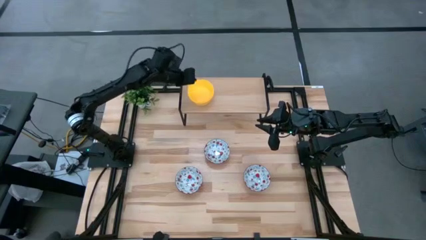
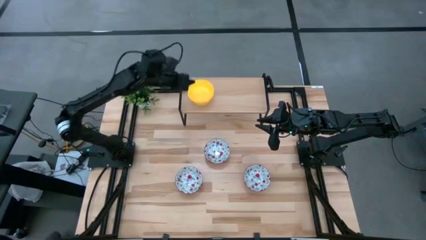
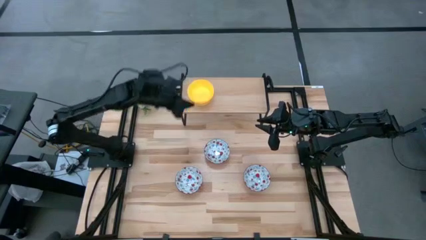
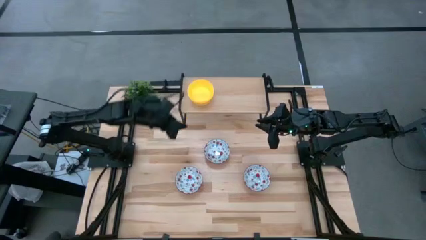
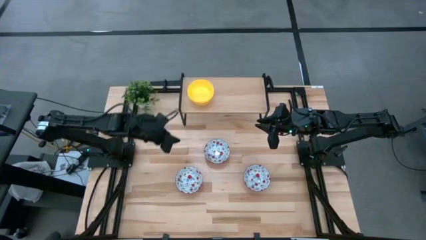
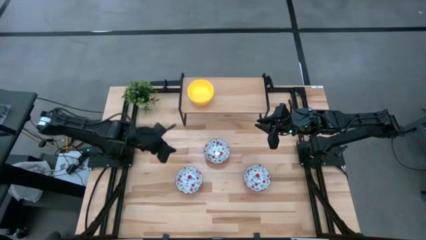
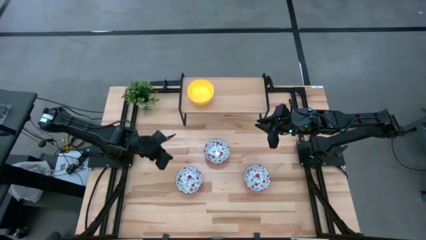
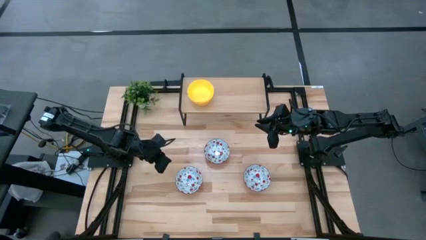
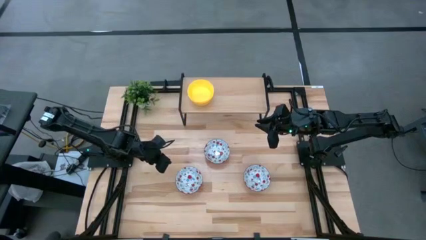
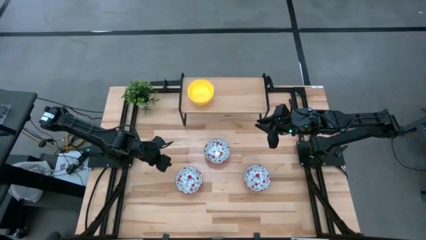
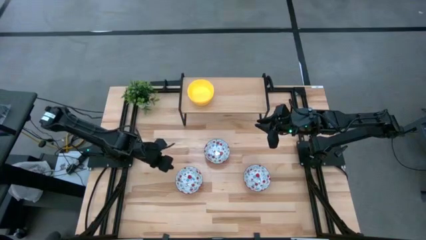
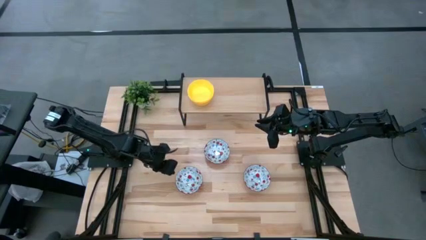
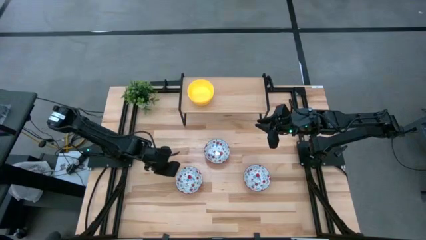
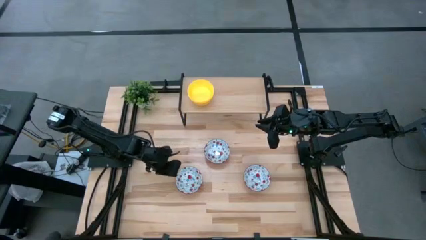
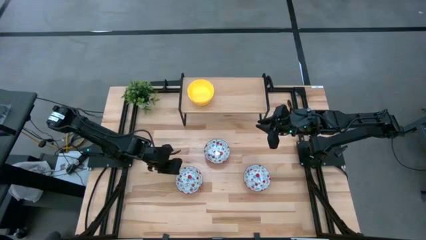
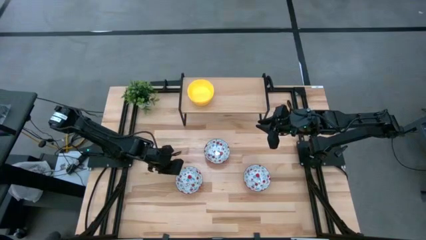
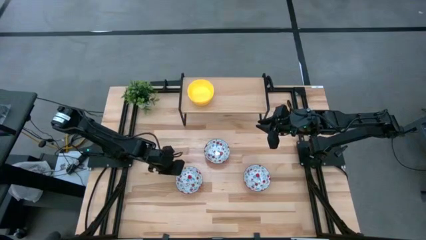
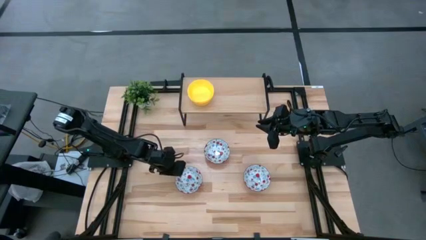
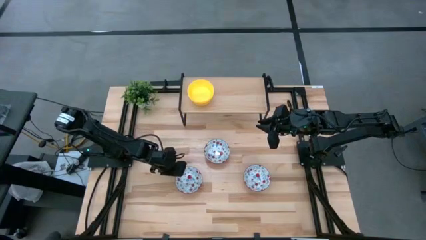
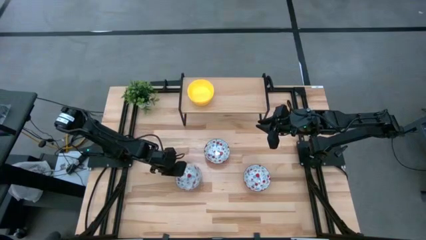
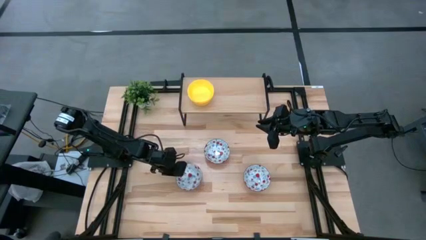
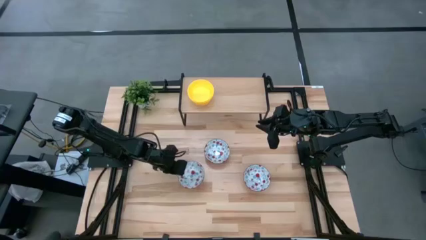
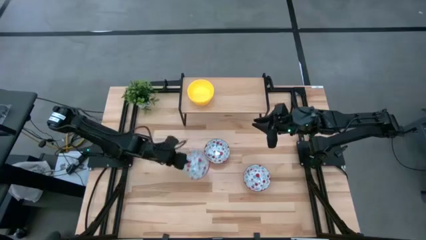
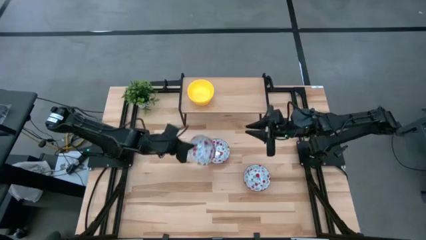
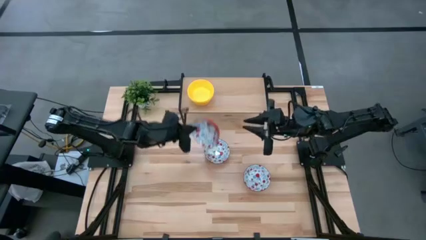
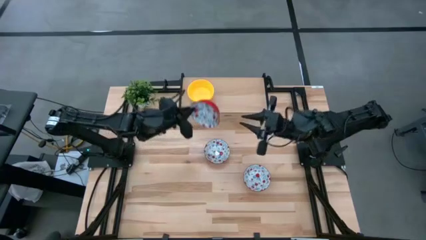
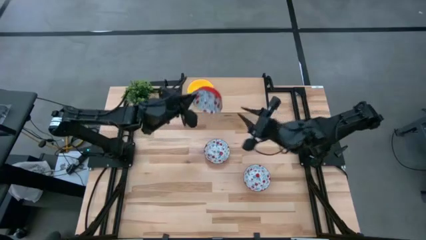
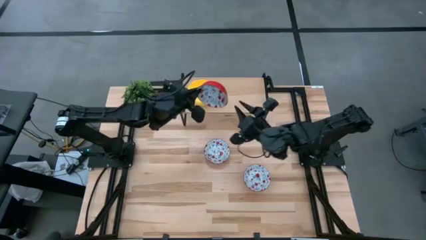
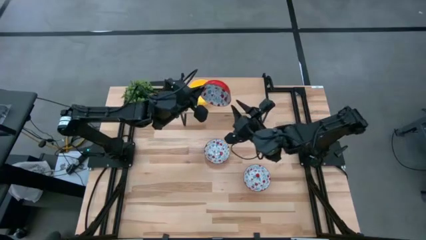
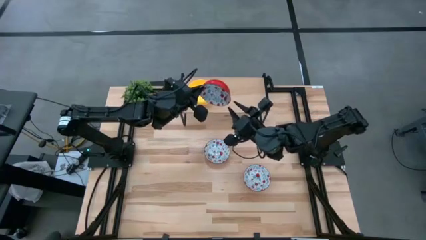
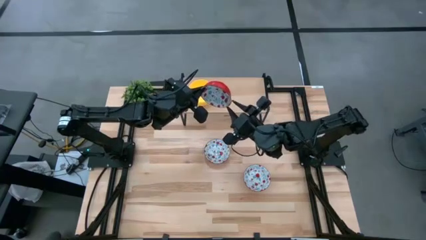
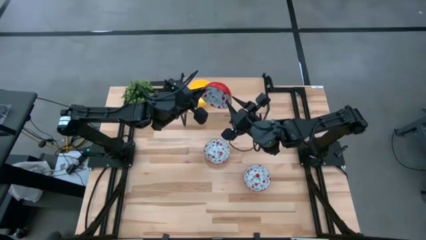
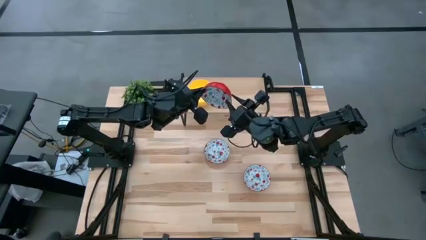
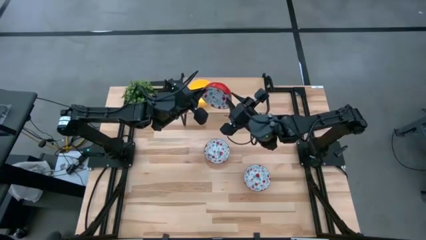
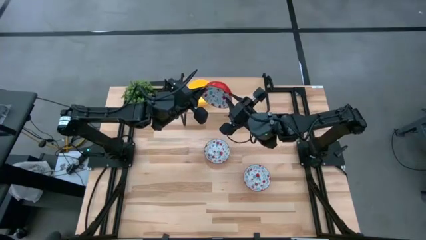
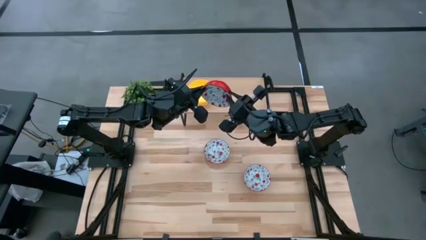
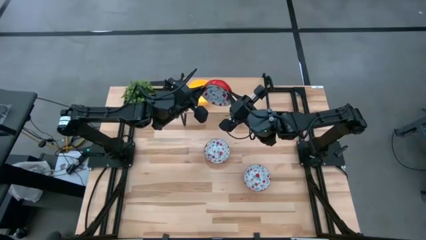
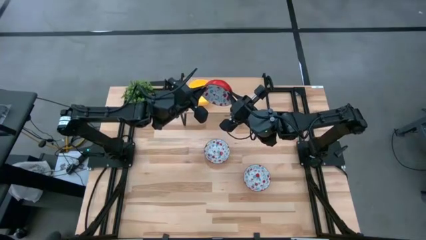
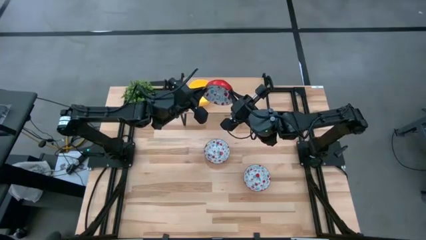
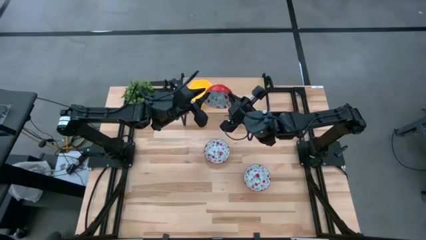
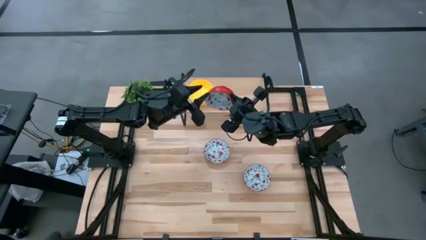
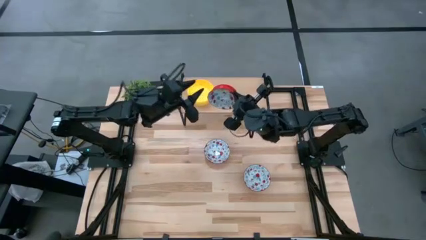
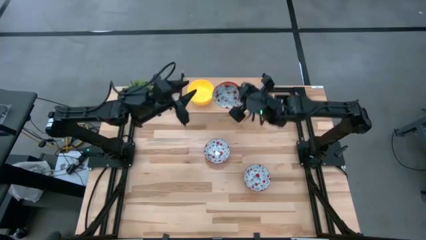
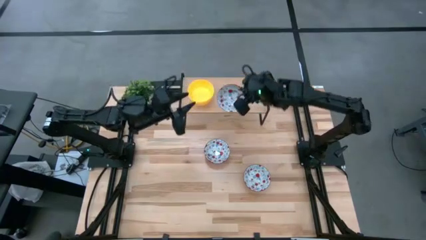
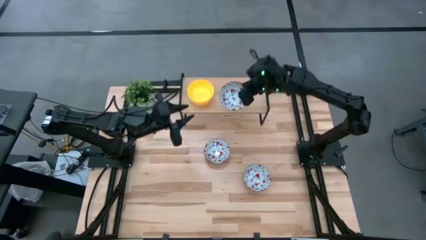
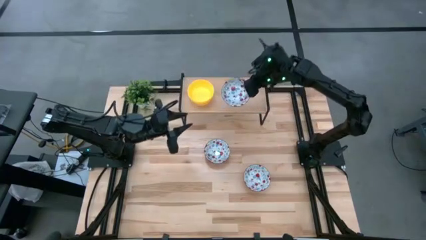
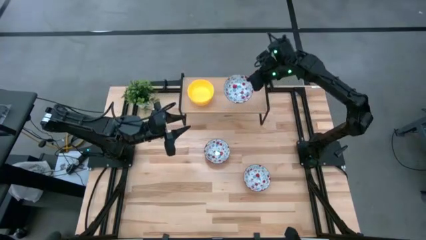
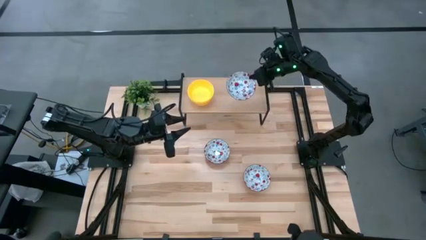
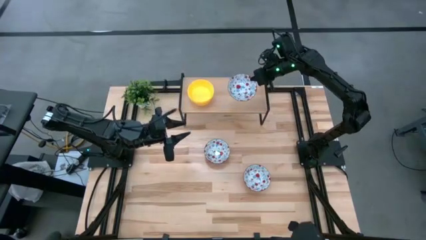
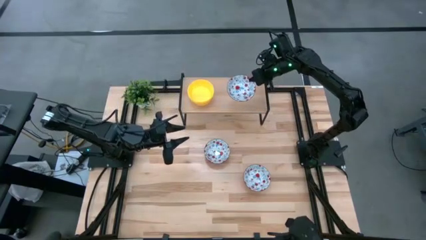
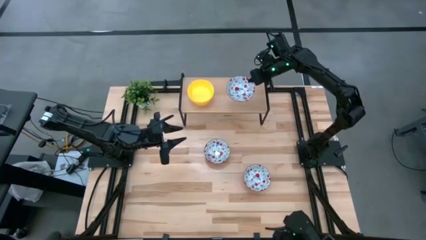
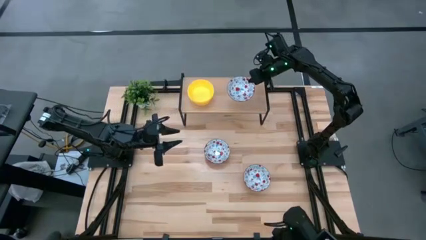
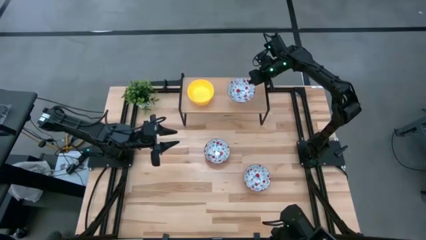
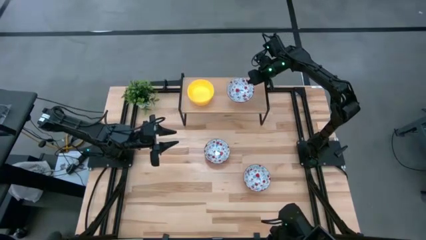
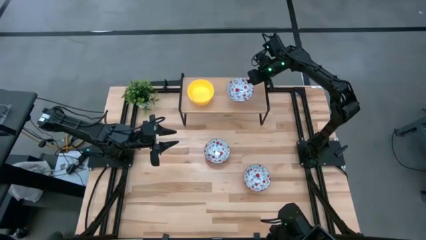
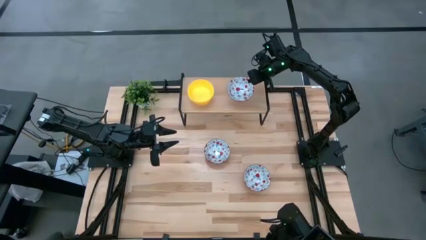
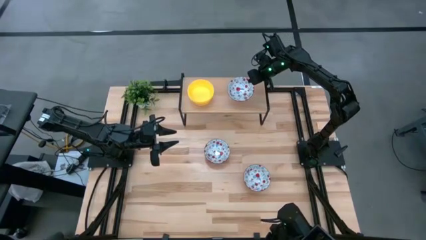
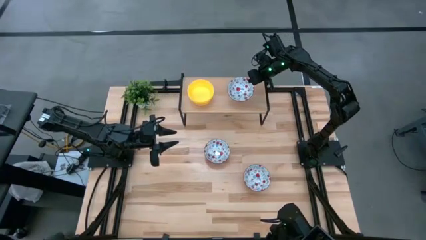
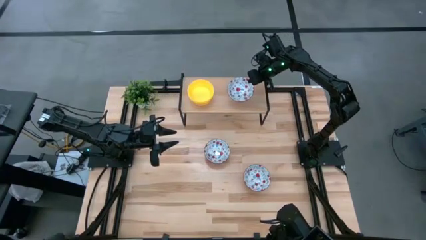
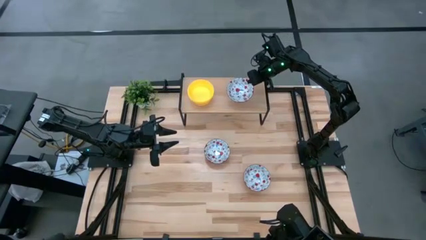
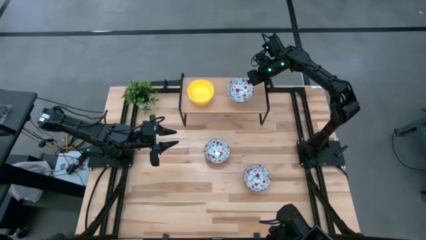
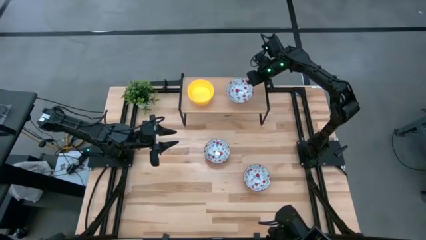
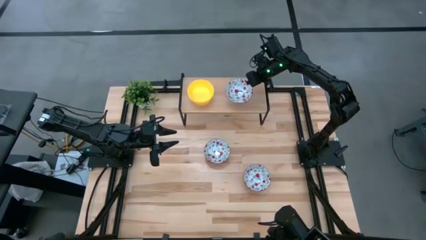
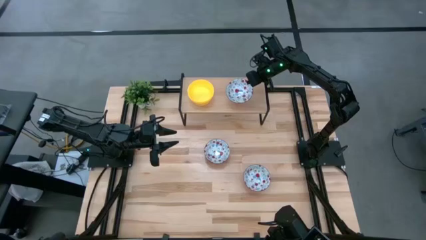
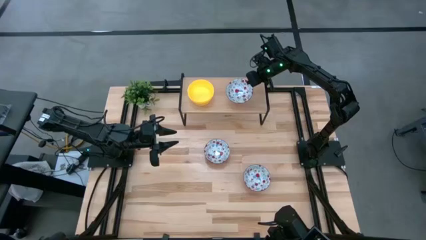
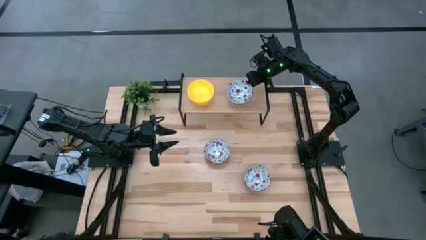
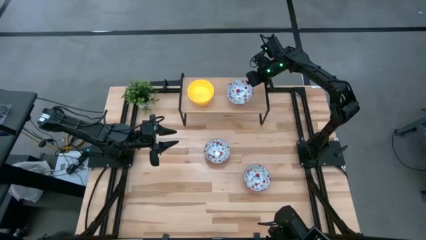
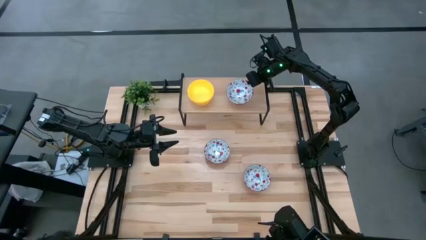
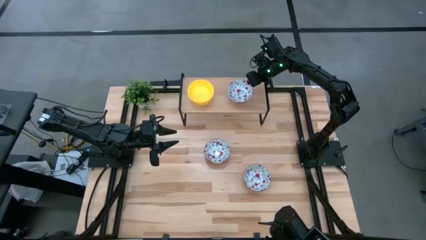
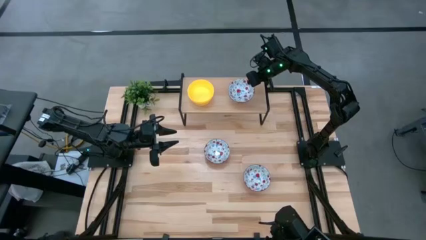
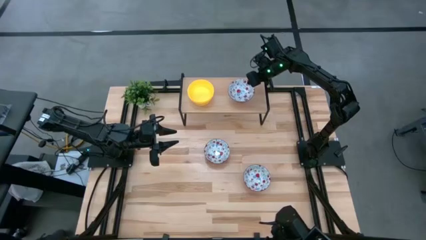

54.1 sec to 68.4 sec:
Task: Pick & Place Mini bowls
Put the bottom left white bowl on the shelf
